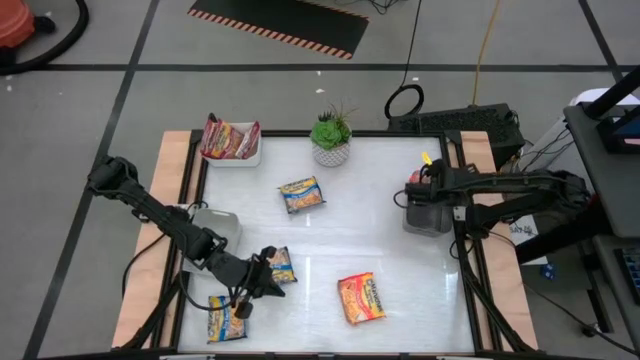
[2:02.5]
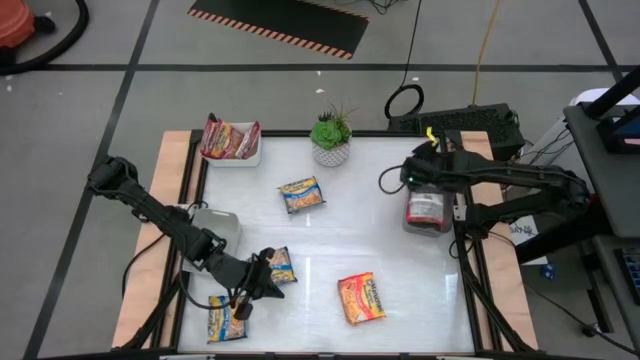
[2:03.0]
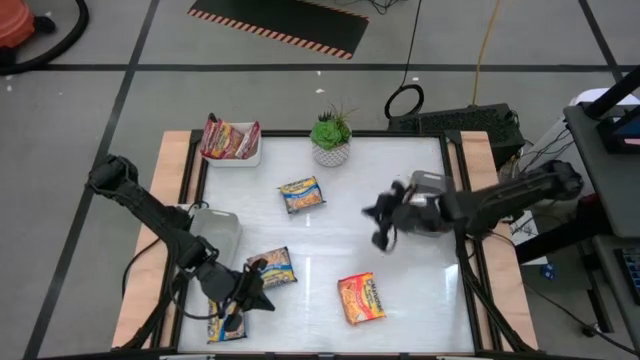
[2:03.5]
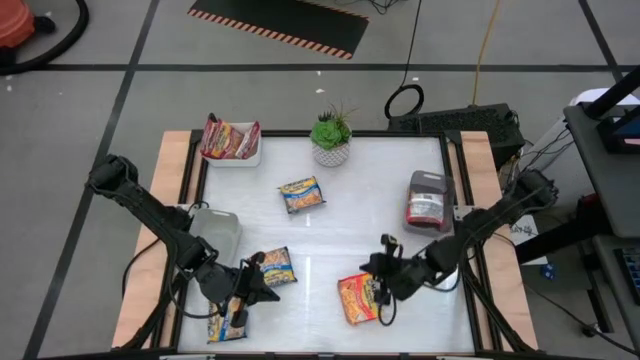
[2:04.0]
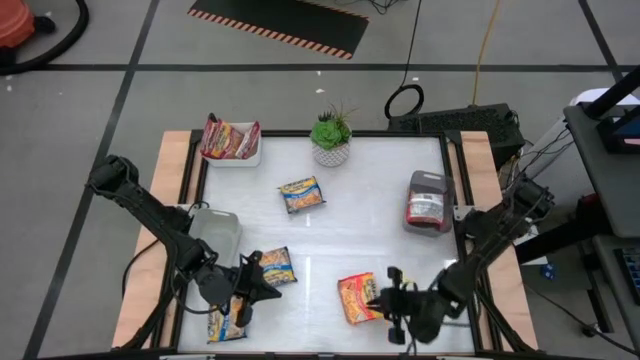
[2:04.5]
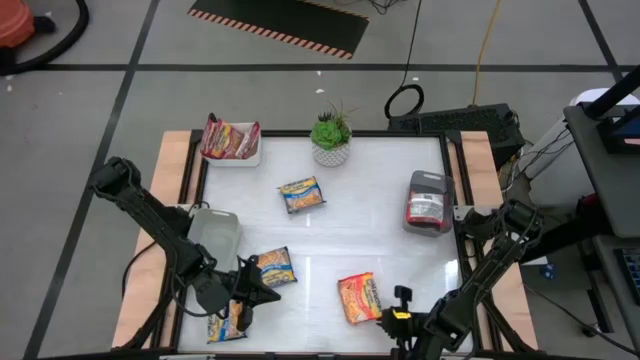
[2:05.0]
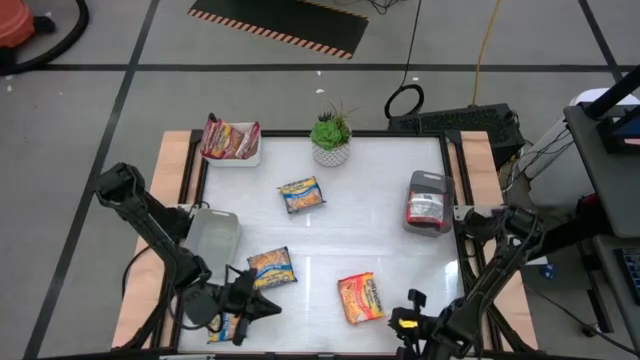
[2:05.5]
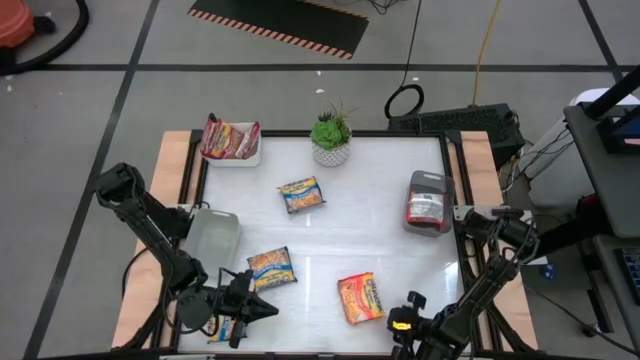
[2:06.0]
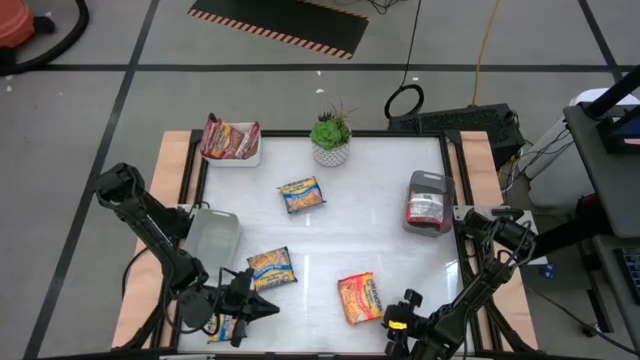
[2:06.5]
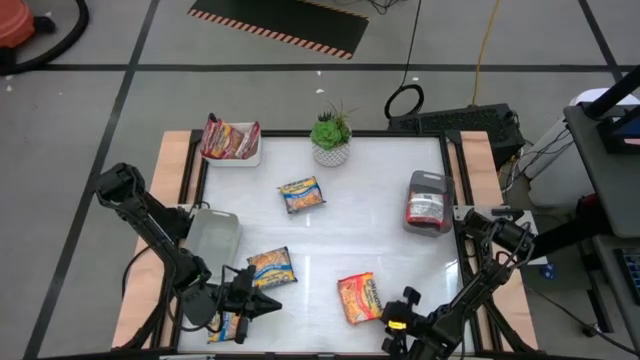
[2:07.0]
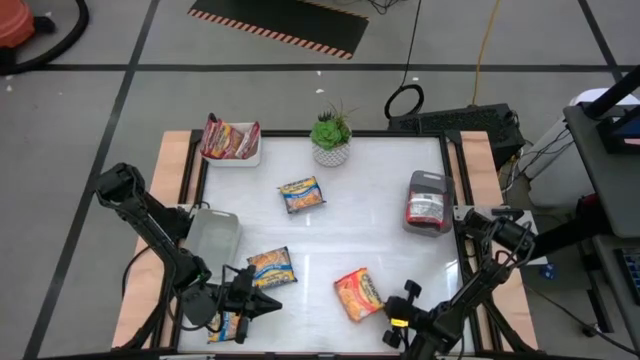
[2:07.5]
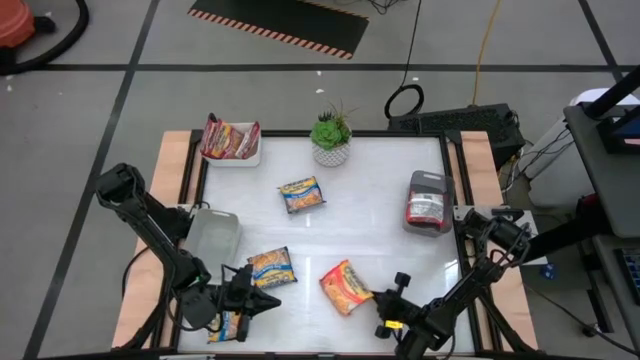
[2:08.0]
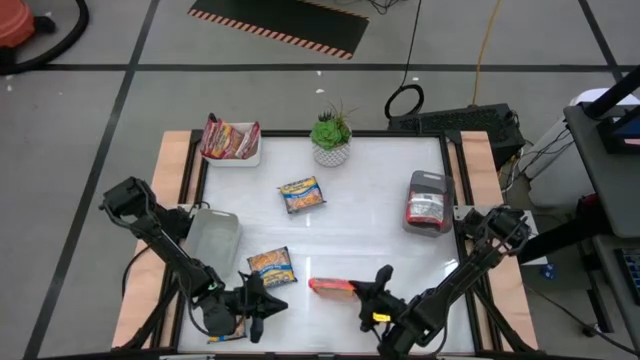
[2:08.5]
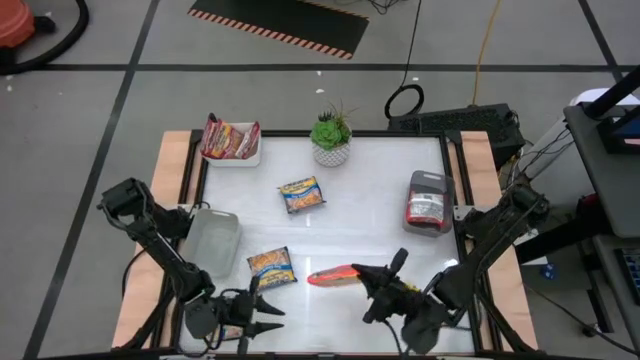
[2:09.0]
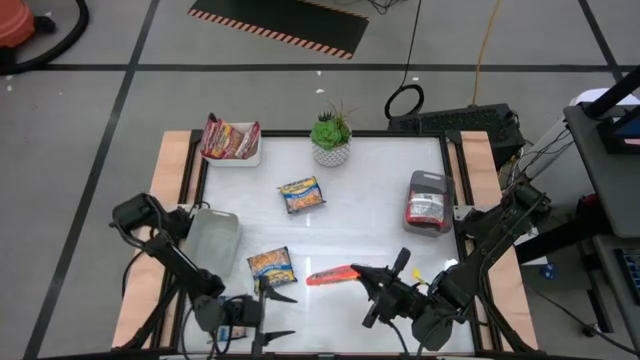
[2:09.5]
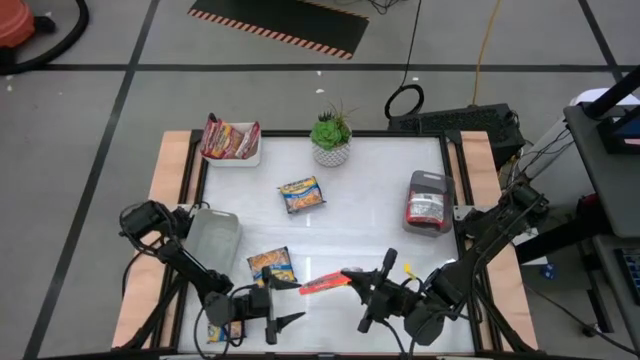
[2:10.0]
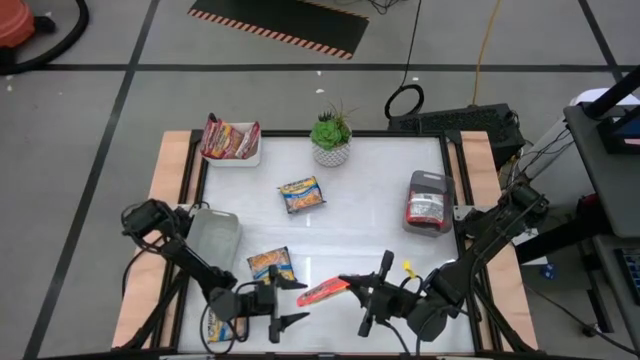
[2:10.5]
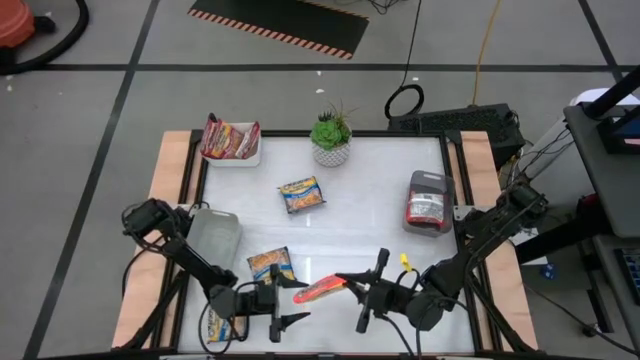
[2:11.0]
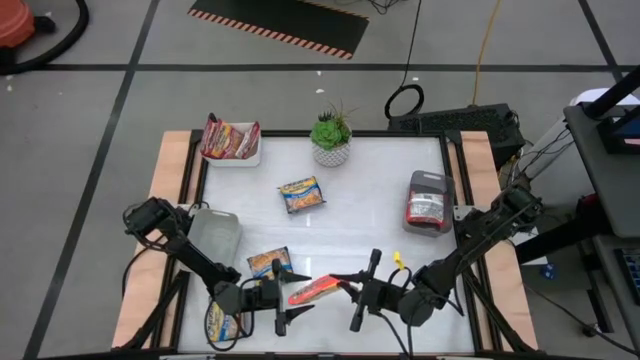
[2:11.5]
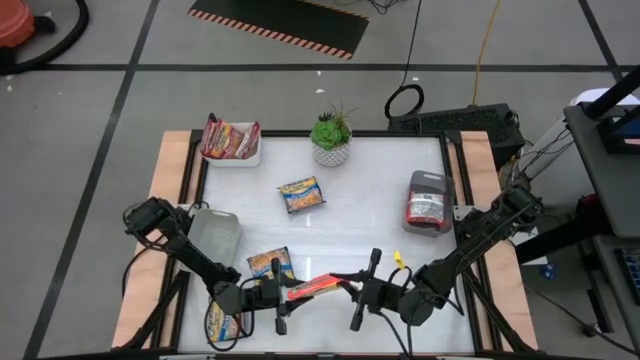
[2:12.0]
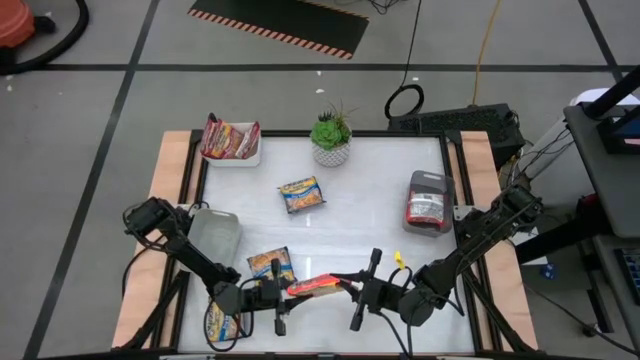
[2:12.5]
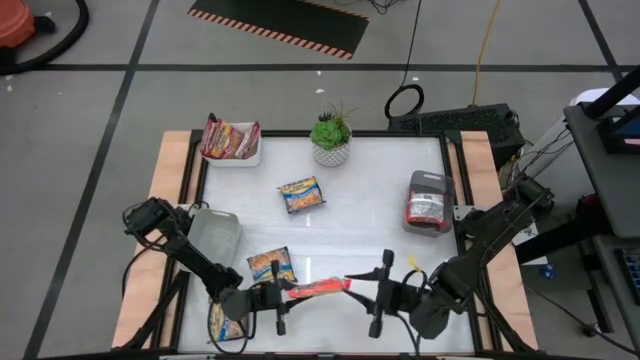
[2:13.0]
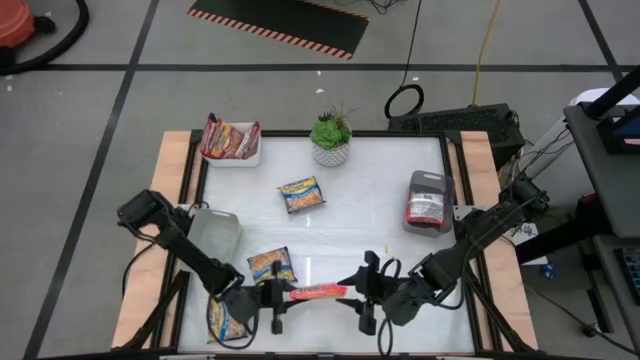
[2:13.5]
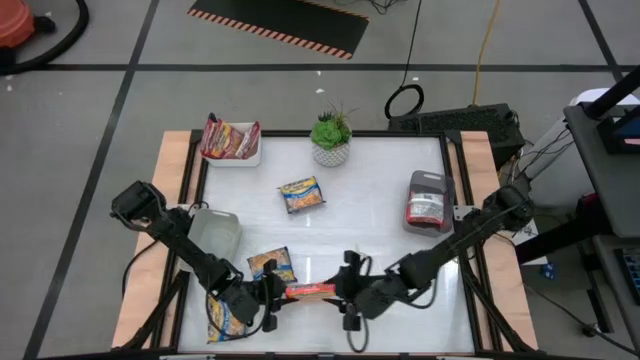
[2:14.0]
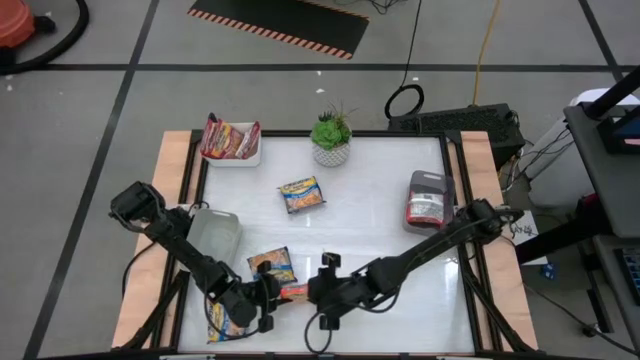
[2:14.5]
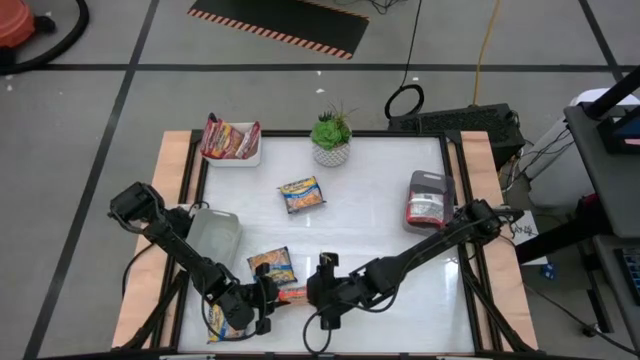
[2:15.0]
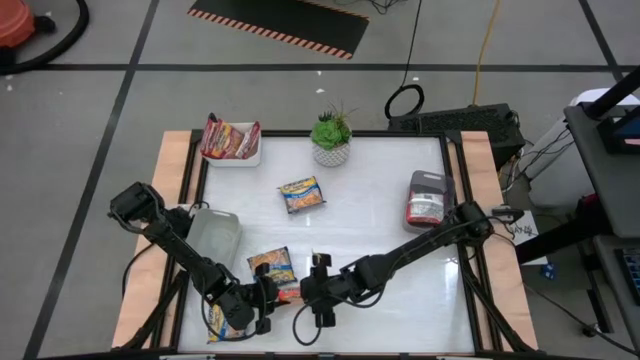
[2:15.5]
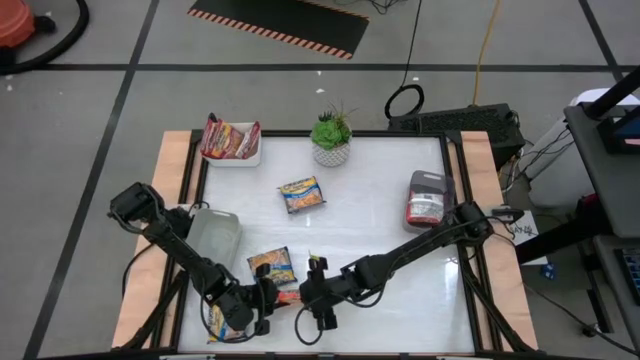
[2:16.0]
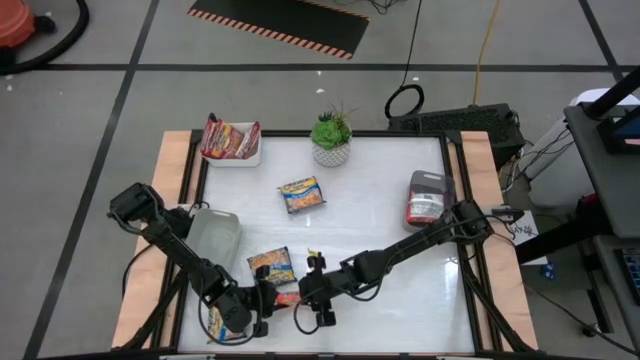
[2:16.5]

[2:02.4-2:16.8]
Task: Sort Maruchan noodles
Put the orange noodle pack into the black bin

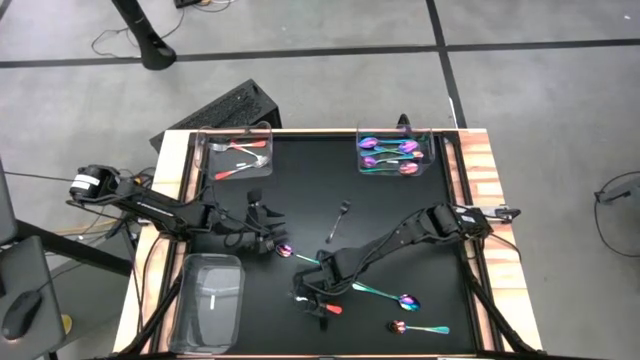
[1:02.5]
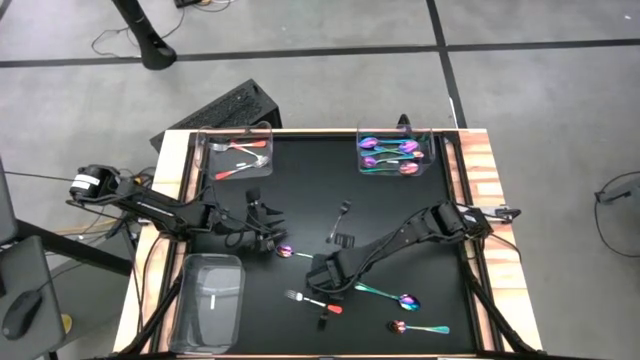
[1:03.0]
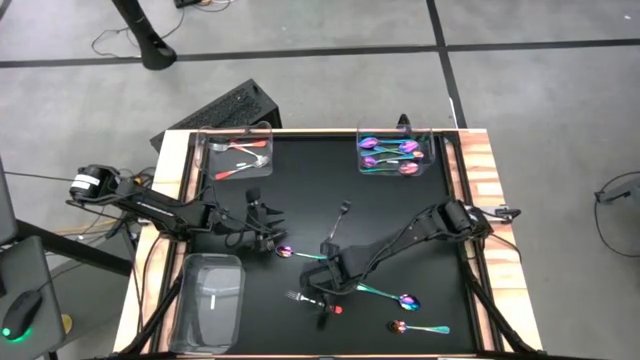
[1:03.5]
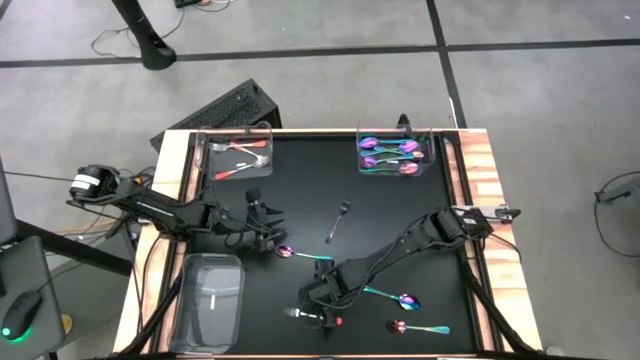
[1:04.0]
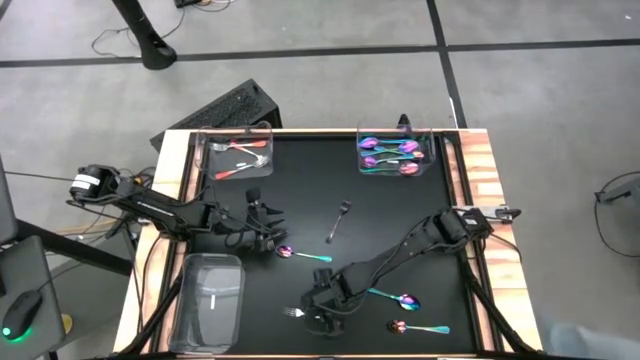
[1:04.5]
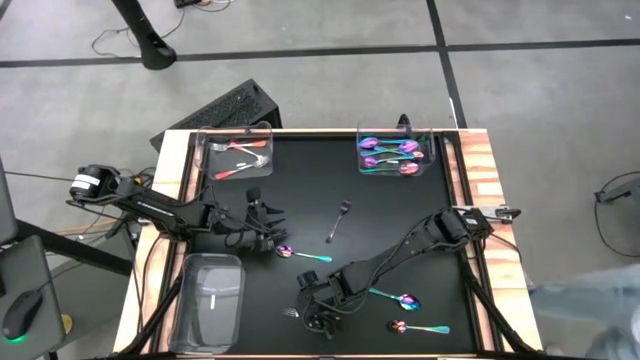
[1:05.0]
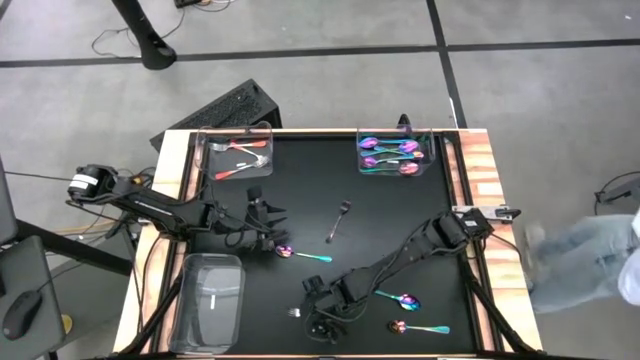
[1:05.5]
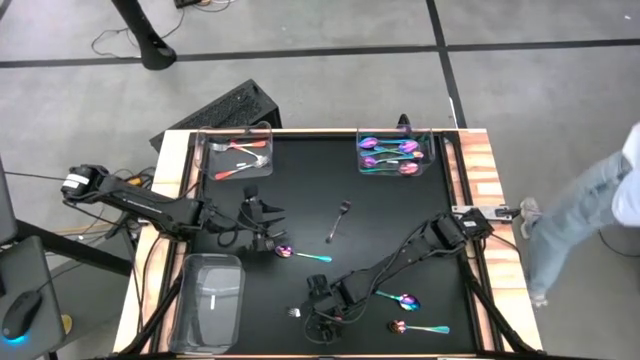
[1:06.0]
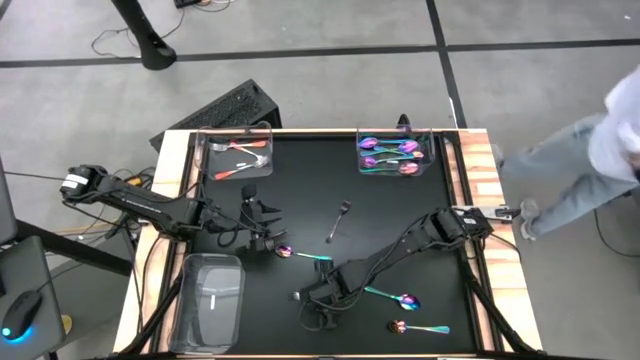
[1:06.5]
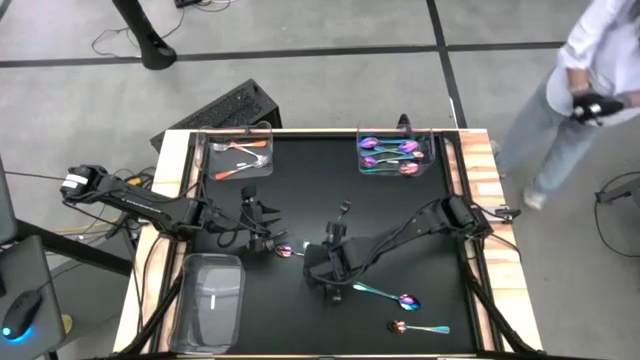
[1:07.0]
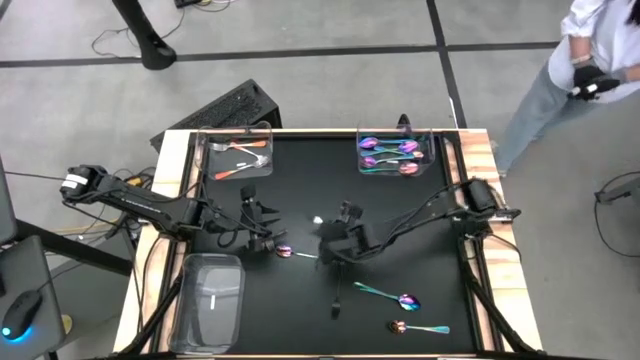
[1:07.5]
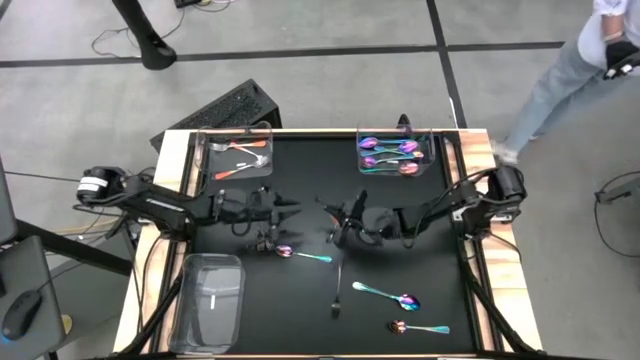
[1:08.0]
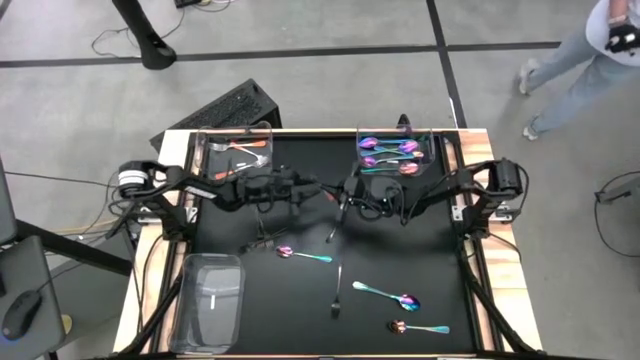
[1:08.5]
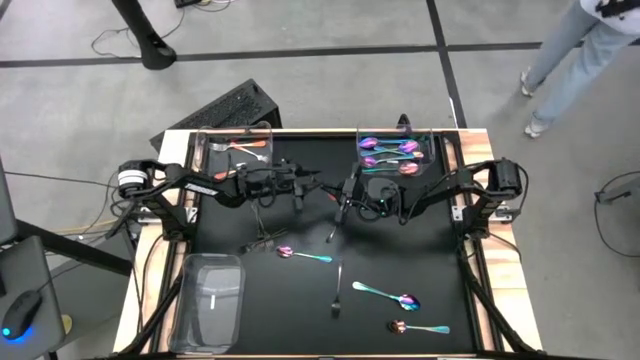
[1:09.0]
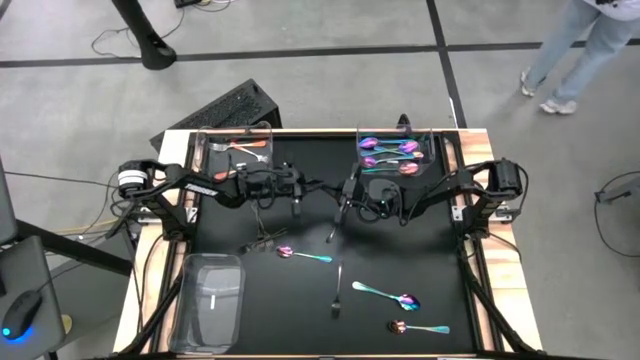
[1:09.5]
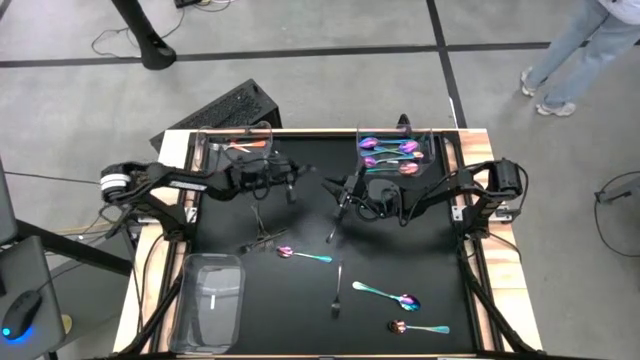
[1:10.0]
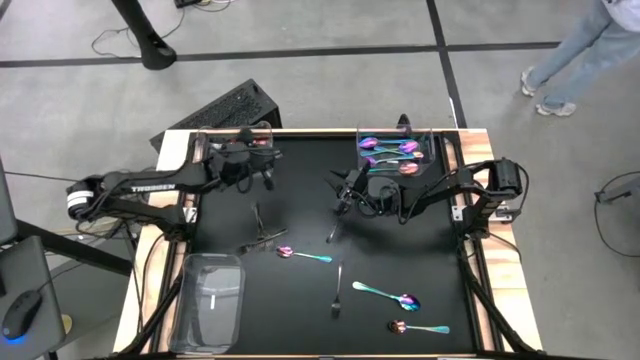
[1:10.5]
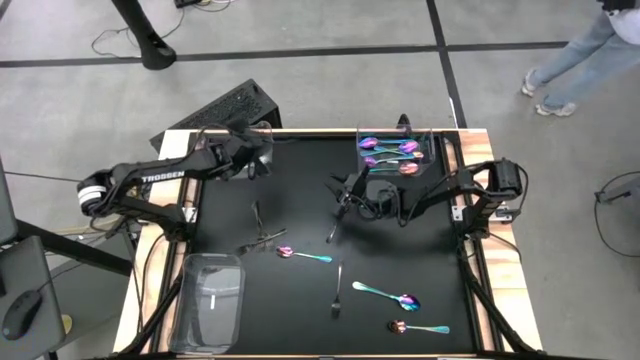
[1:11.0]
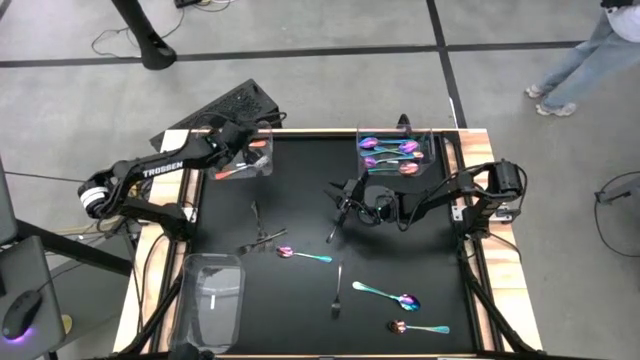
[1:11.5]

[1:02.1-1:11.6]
Task: Sort silverware by color (type)
Put the orange fork into top left transparent bin
